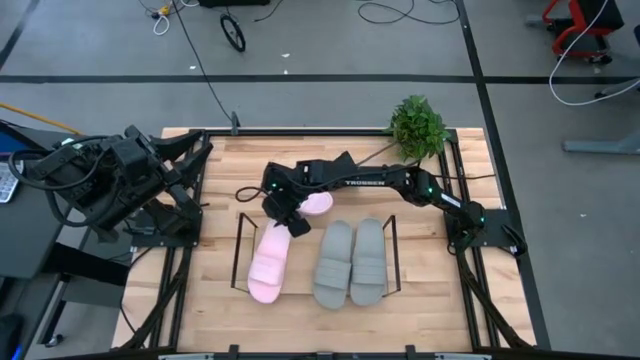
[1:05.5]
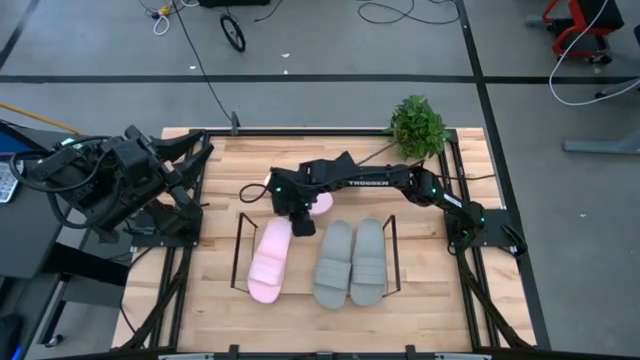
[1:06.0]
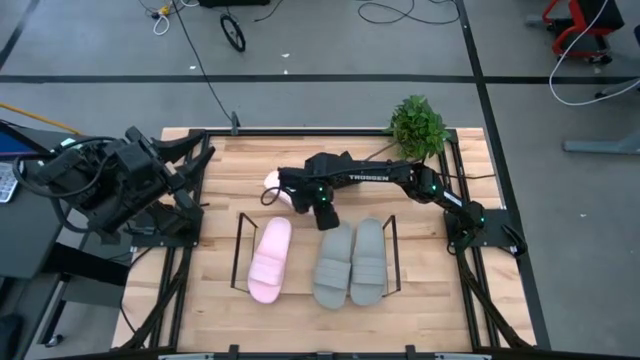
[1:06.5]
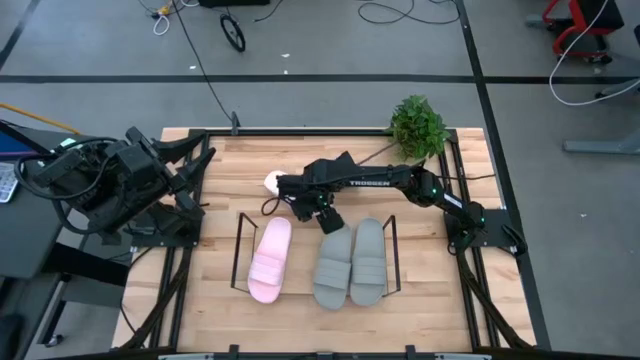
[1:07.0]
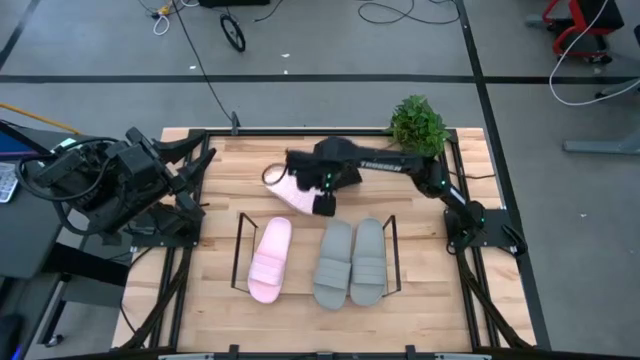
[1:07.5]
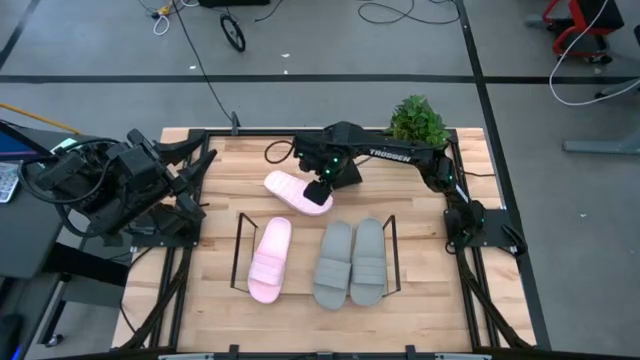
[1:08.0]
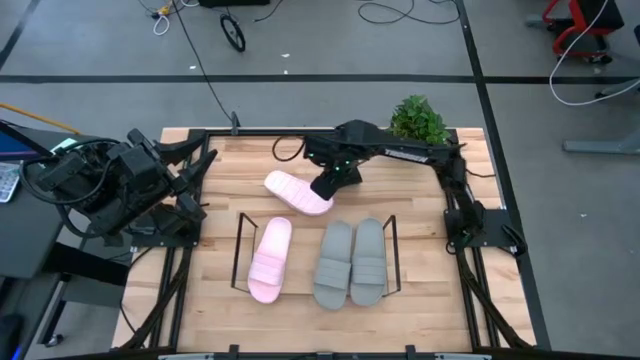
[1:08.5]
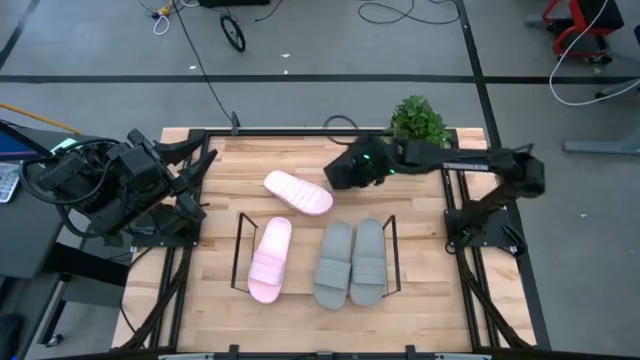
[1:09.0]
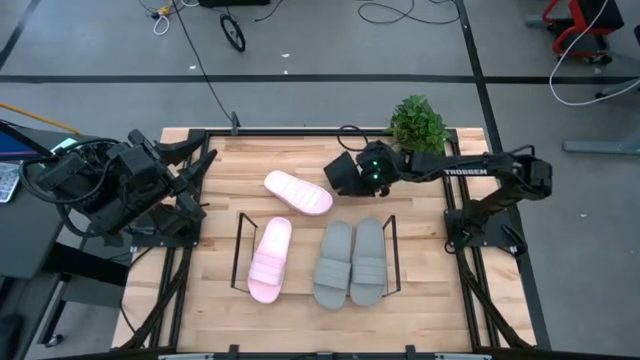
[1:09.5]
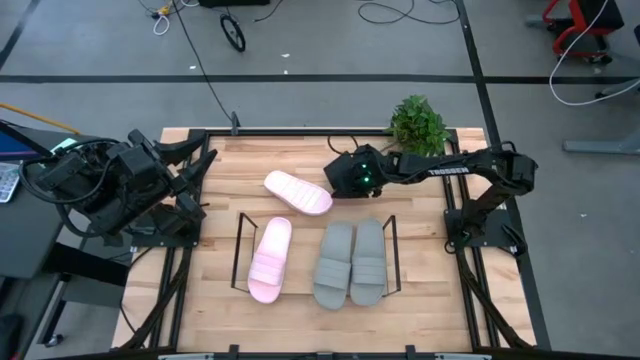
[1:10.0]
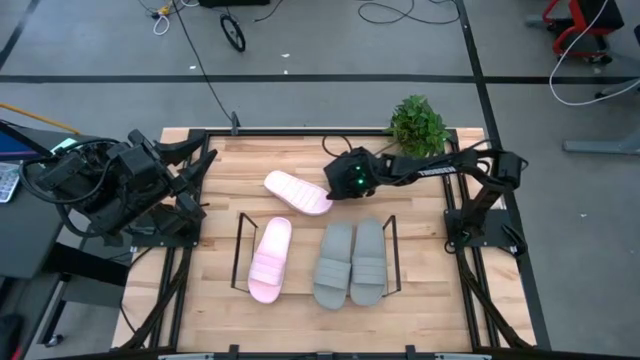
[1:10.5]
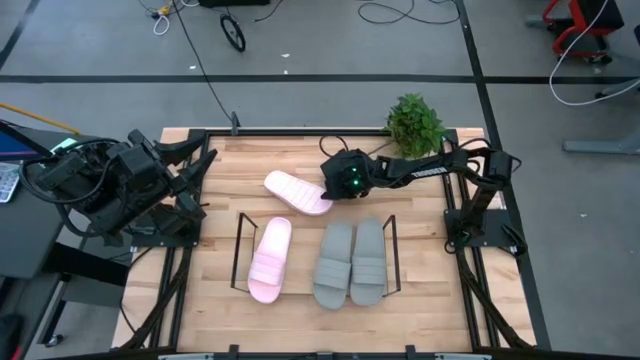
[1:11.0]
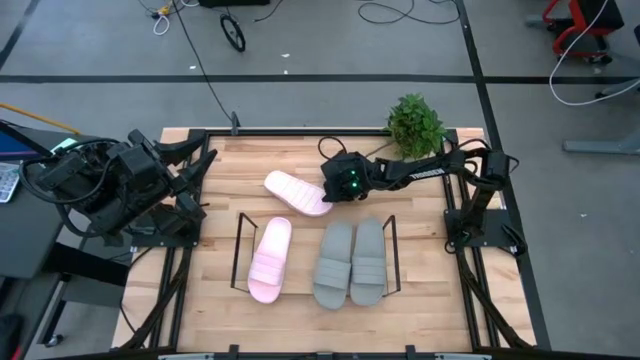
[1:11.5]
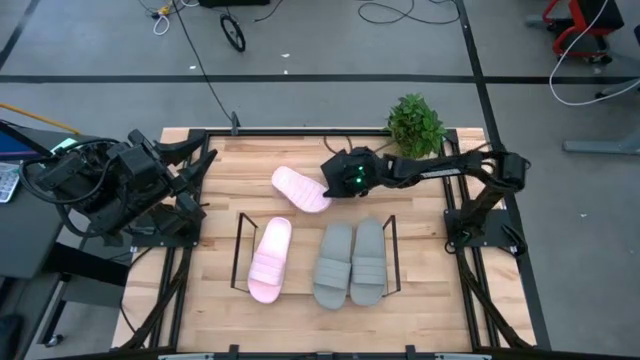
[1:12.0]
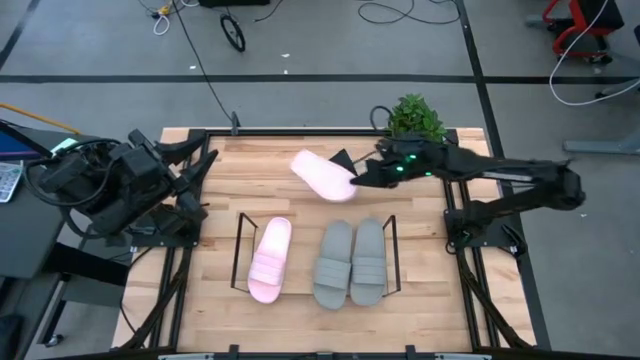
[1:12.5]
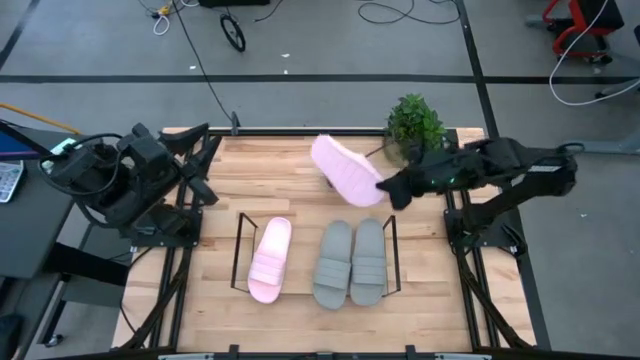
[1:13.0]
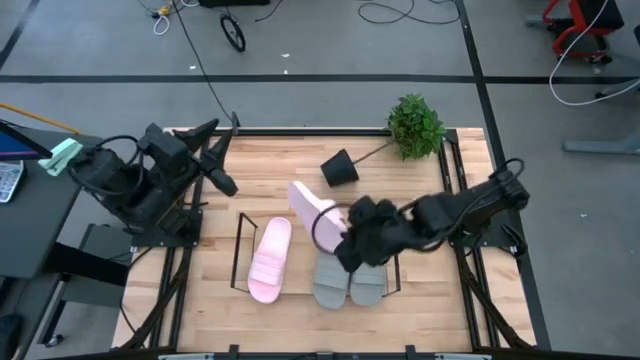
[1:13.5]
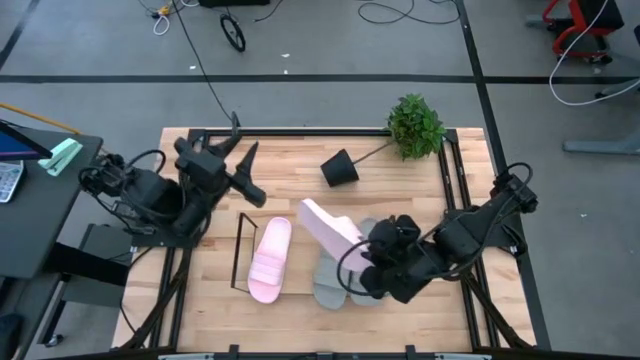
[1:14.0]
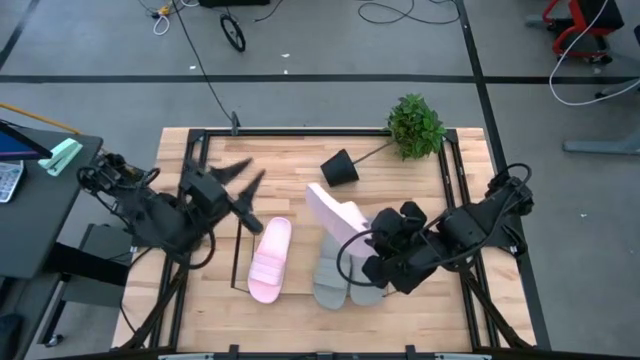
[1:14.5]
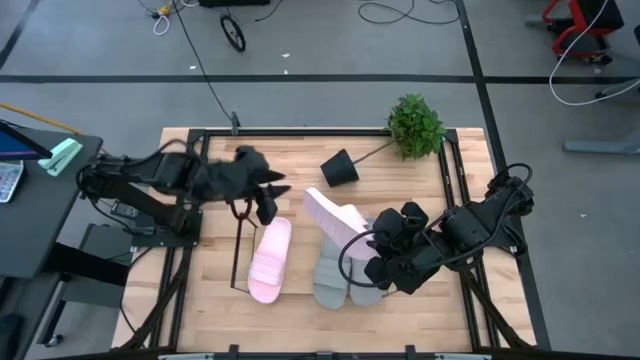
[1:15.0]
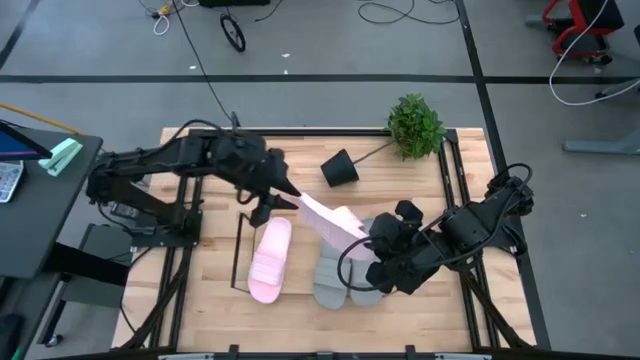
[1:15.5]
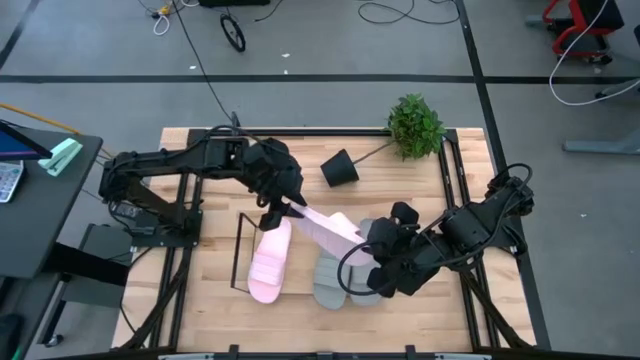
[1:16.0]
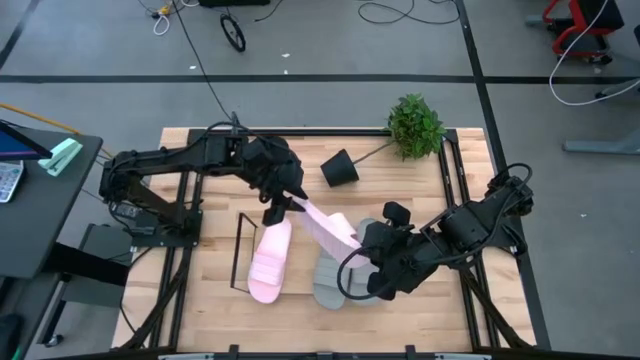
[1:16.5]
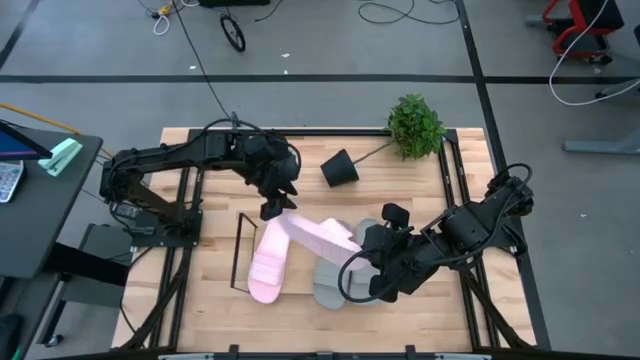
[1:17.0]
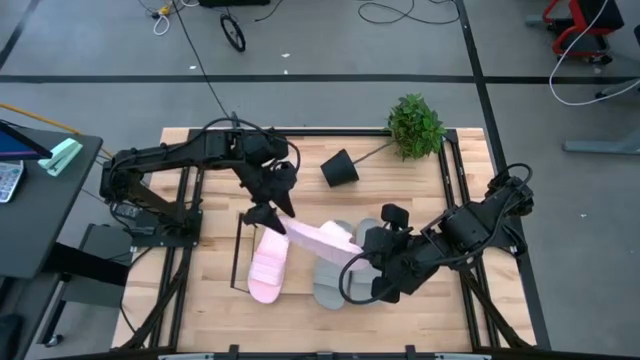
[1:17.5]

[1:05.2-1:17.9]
Task: Pick and place slides into the shelf
Align the pink slipper with the other pink slipper on the shelf

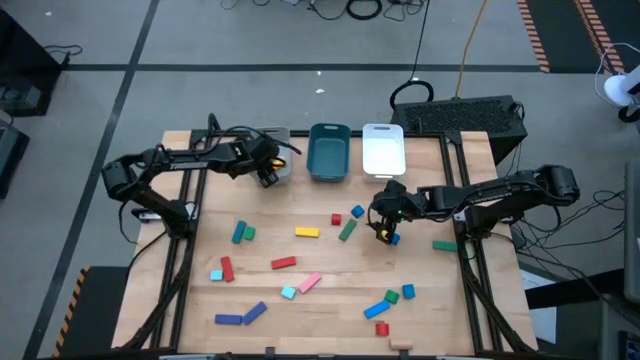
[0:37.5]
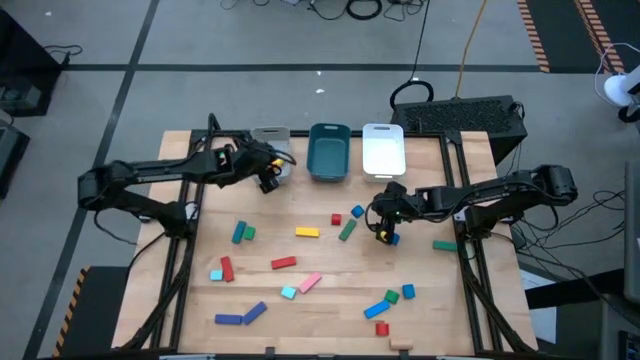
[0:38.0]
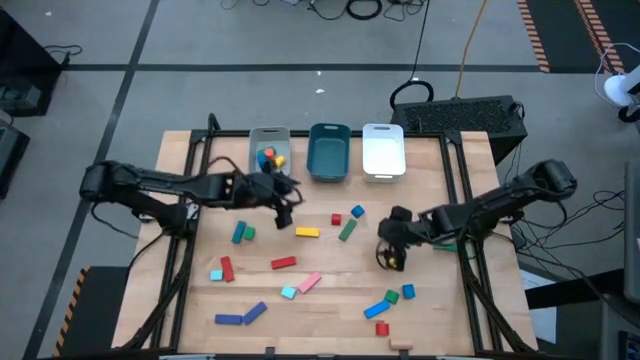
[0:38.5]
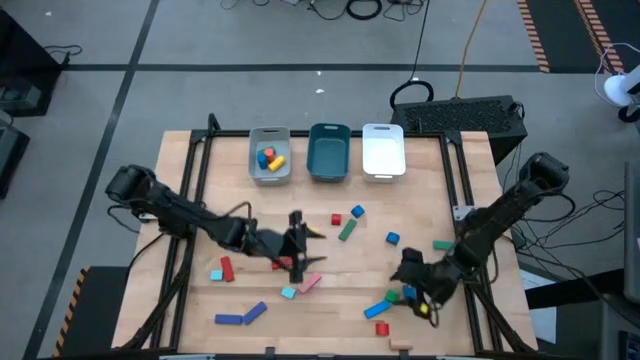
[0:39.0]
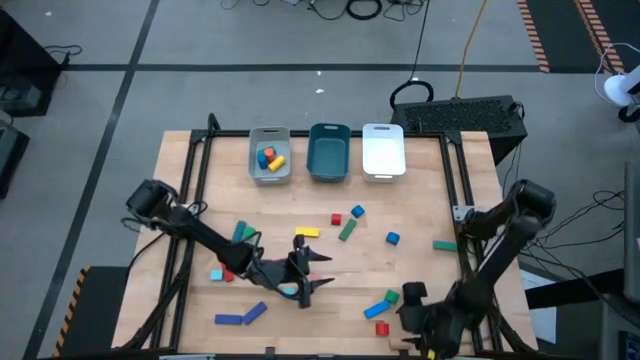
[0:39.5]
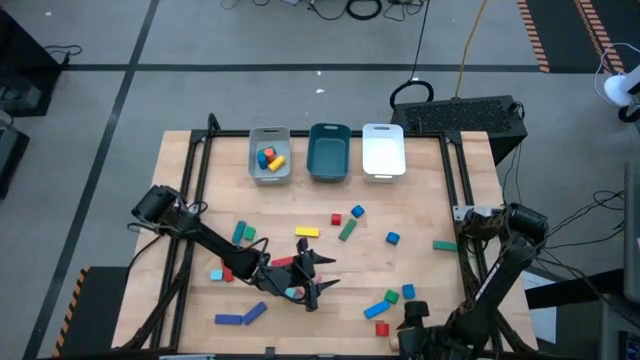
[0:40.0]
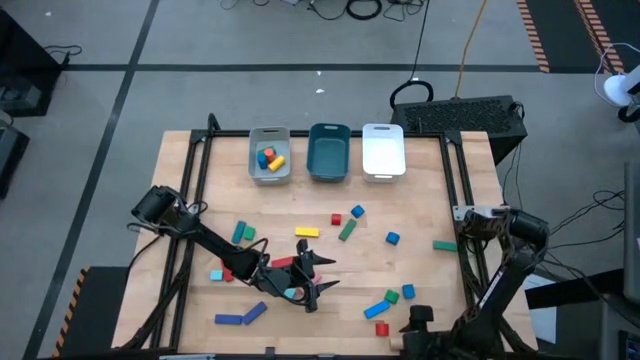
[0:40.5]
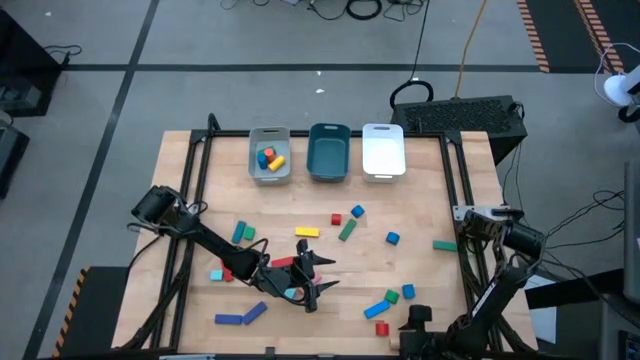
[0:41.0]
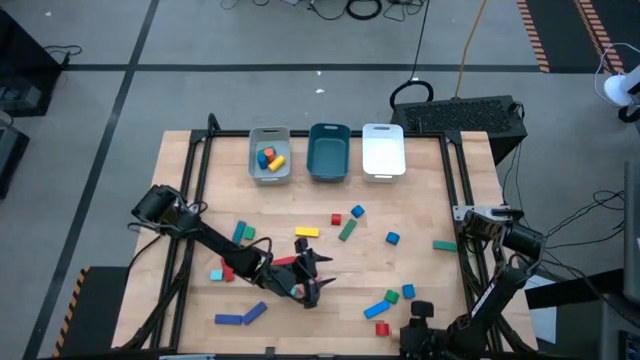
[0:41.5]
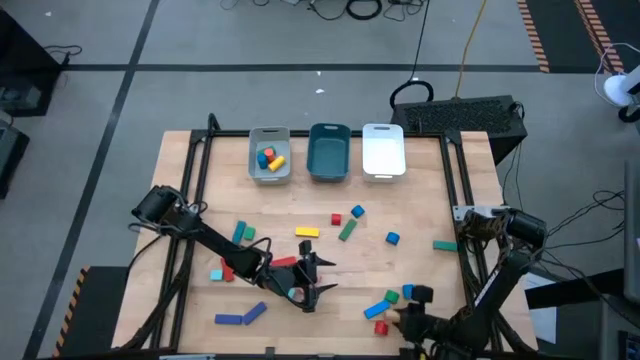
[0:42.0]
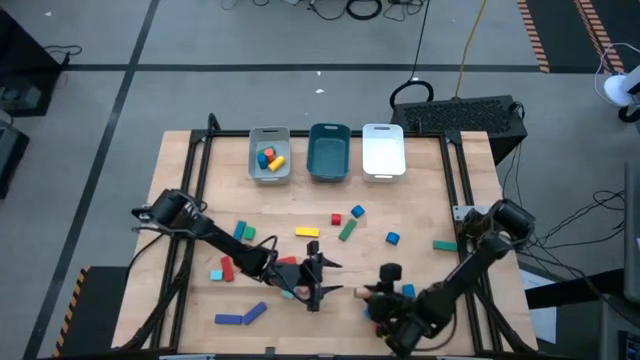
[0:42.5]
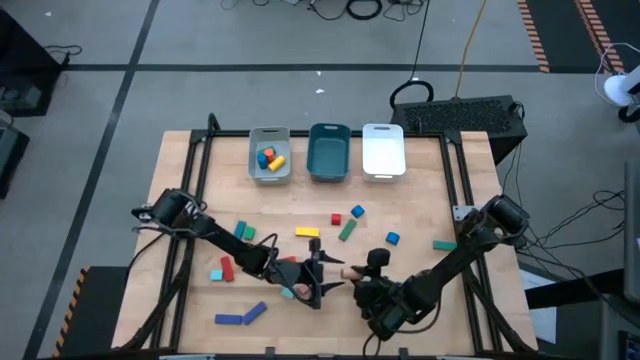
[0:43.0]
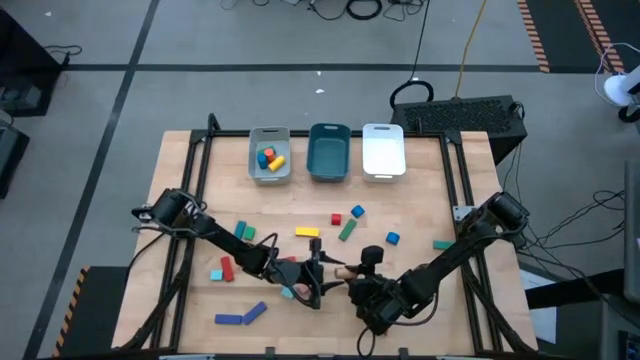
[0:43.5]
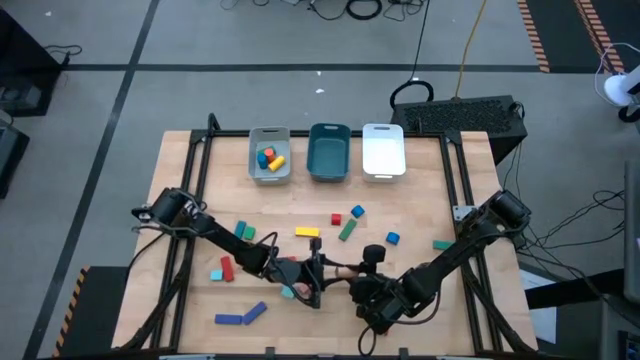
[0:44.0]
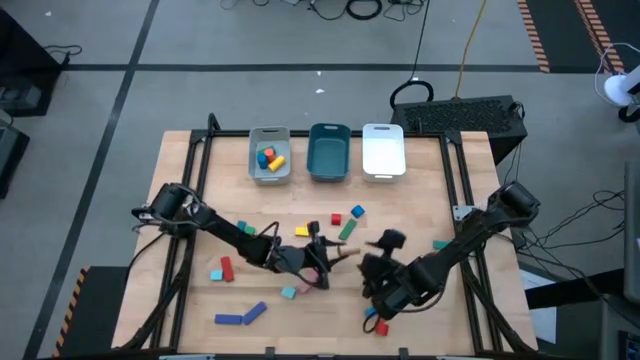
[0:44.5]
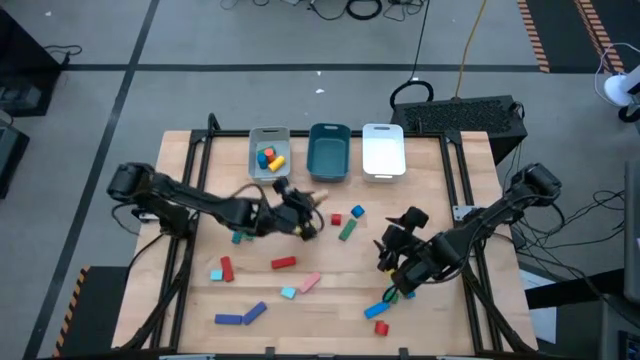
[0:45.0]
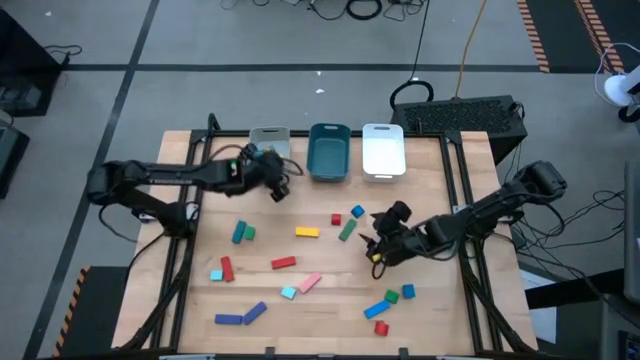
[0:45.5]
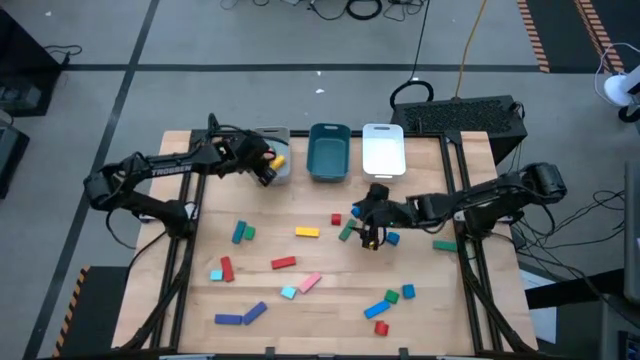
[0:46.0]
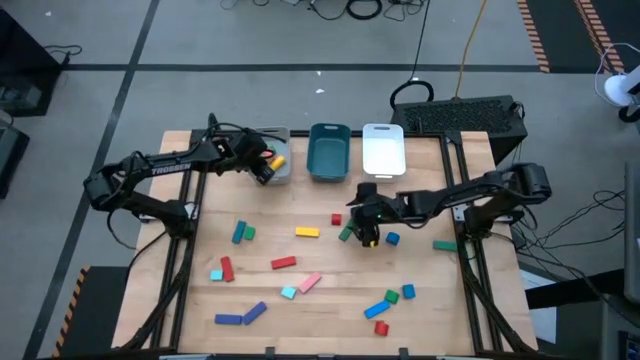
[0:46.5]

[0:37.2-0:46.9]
Task: Sort blocks by size
Put the brown cylinder block into the gray bin

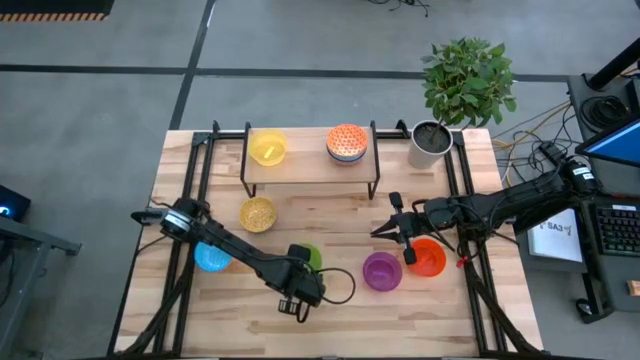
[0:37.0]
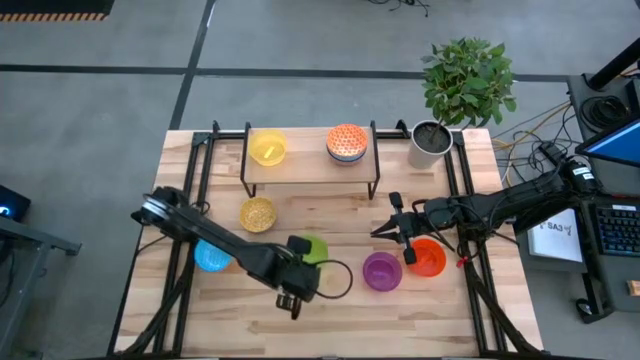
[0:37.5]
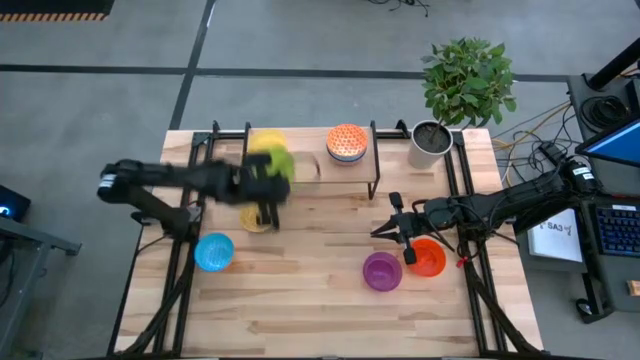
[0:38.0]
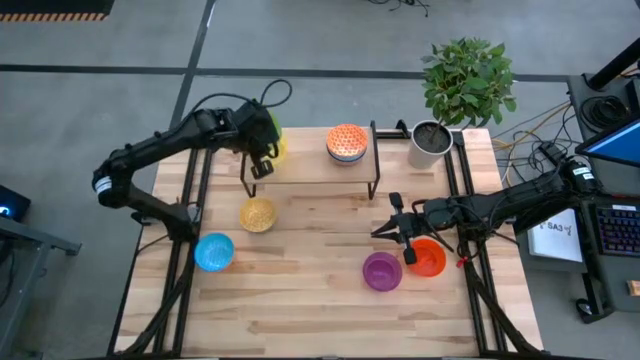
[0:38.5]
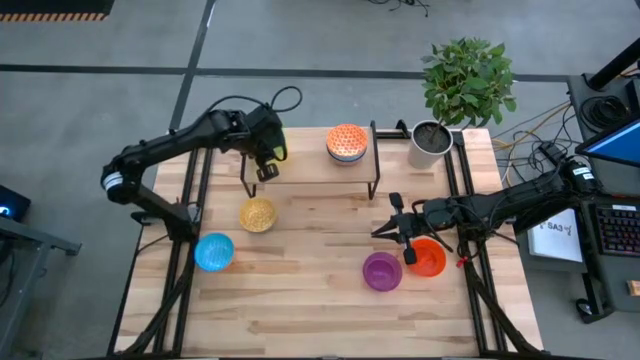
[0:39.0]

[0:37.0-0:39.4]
Task: Place and stack bowls onto a shelf
Stack the green bowl on the top of the yellow bowl on the shelf
